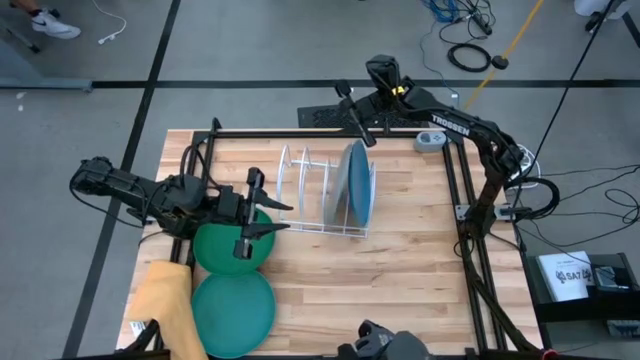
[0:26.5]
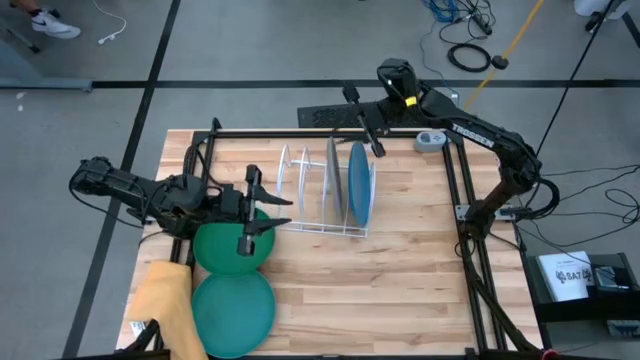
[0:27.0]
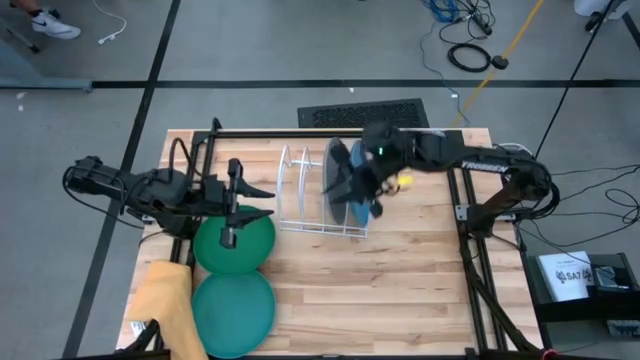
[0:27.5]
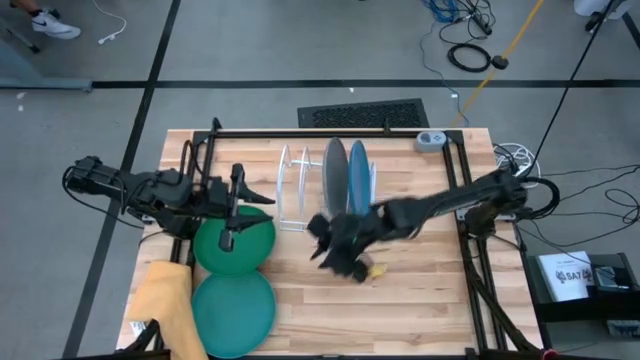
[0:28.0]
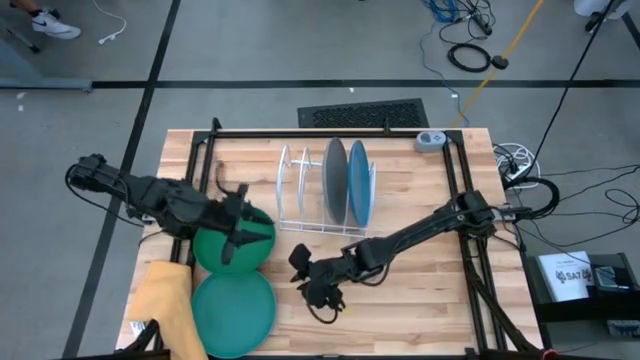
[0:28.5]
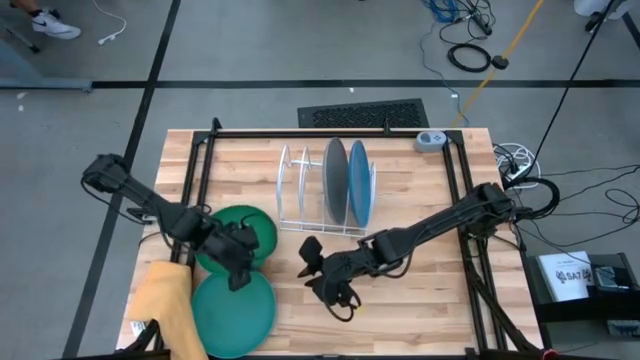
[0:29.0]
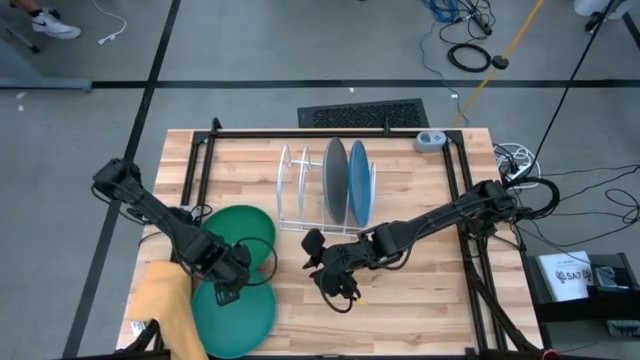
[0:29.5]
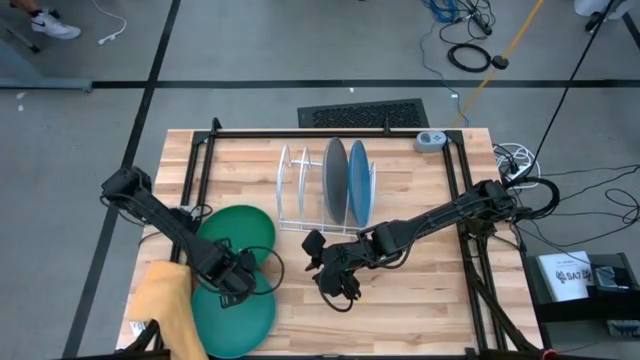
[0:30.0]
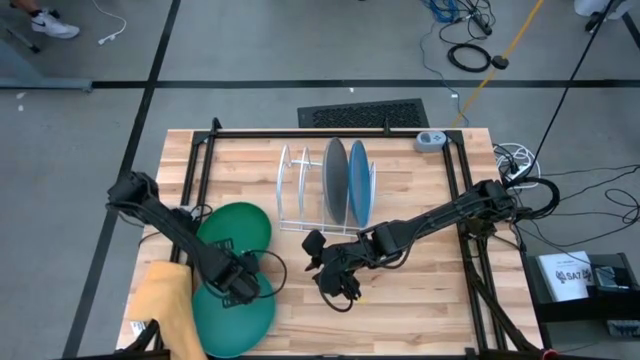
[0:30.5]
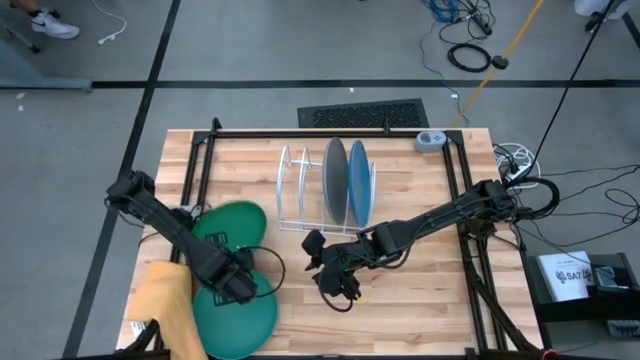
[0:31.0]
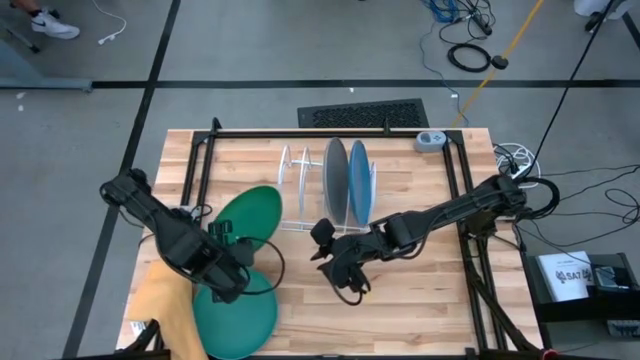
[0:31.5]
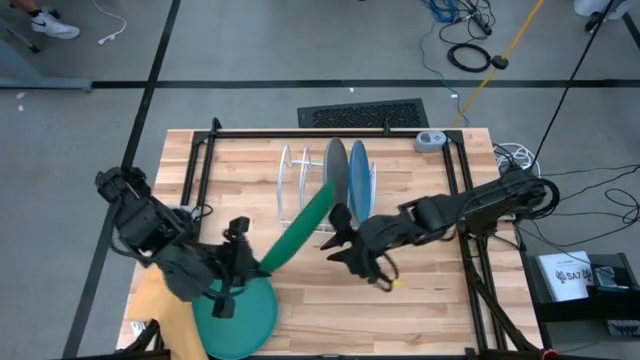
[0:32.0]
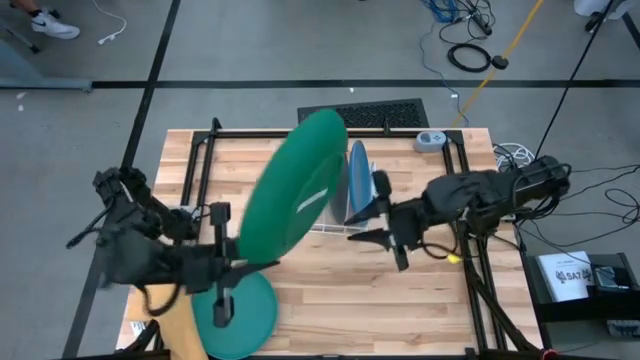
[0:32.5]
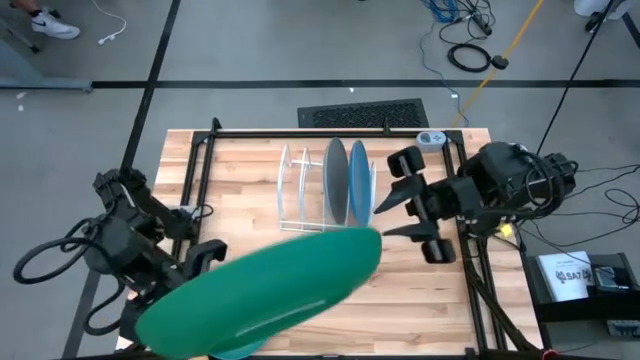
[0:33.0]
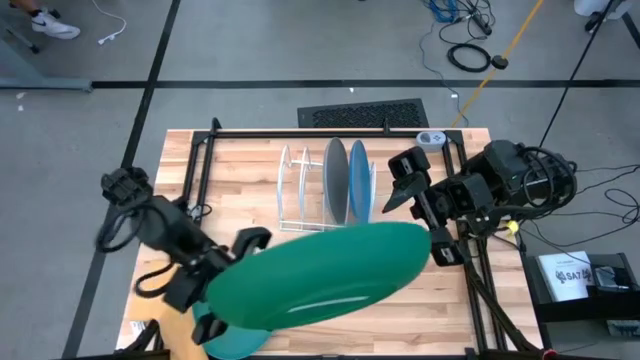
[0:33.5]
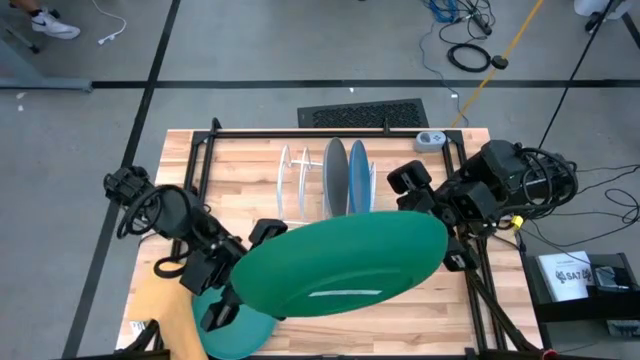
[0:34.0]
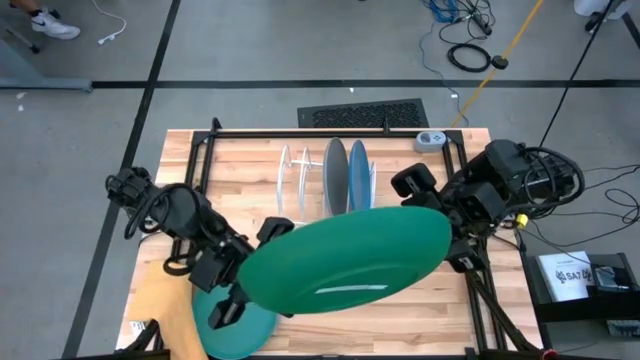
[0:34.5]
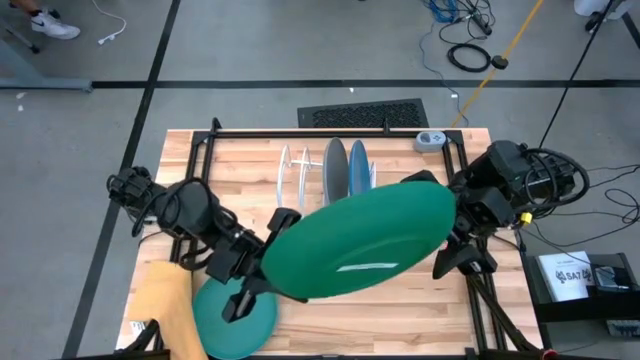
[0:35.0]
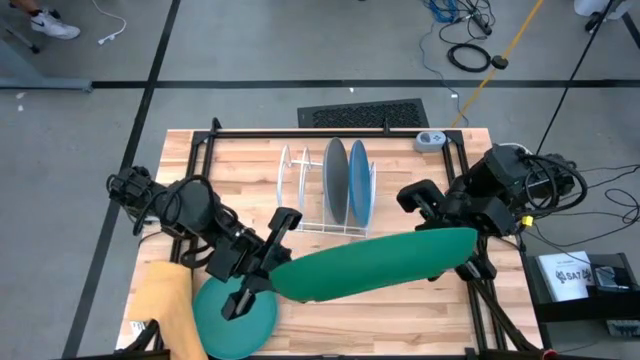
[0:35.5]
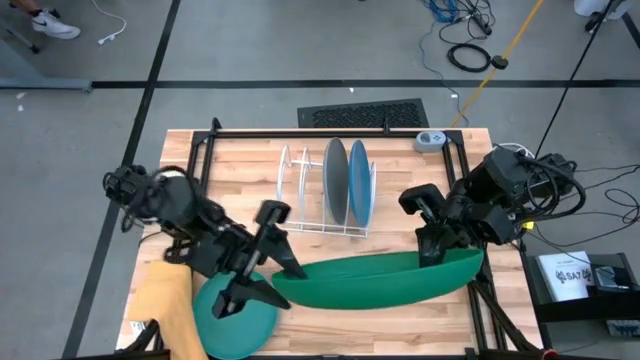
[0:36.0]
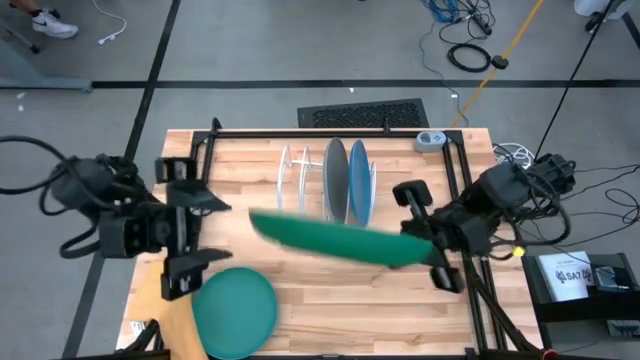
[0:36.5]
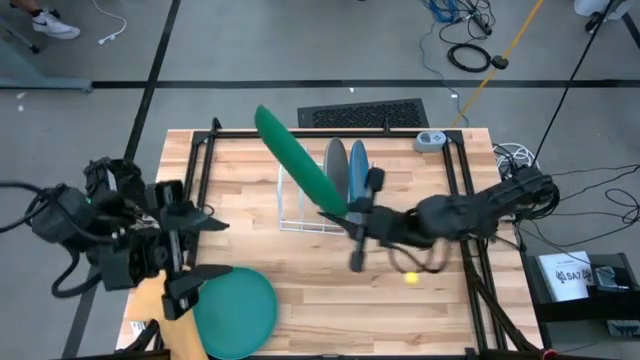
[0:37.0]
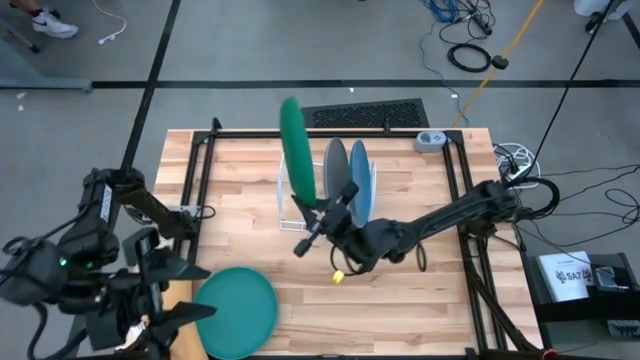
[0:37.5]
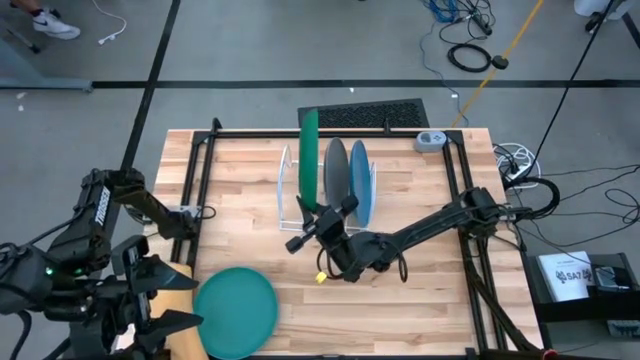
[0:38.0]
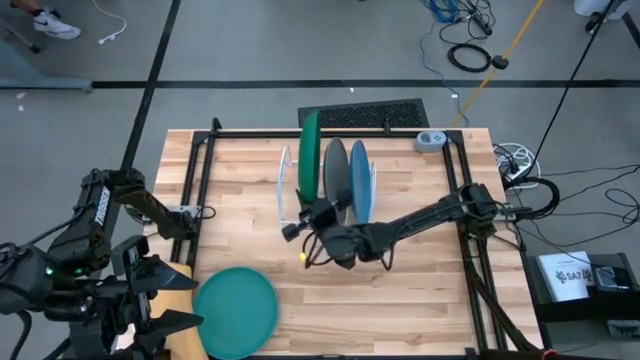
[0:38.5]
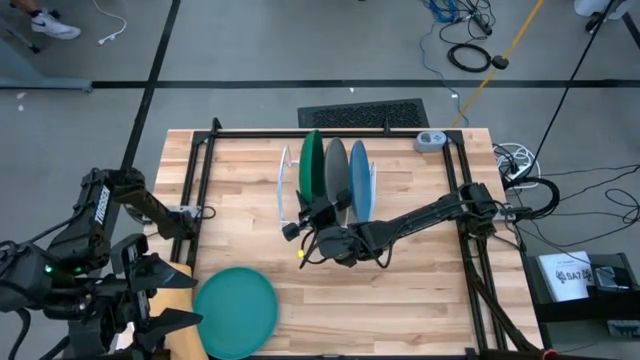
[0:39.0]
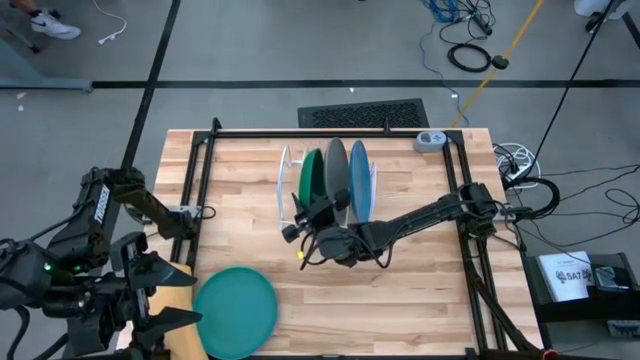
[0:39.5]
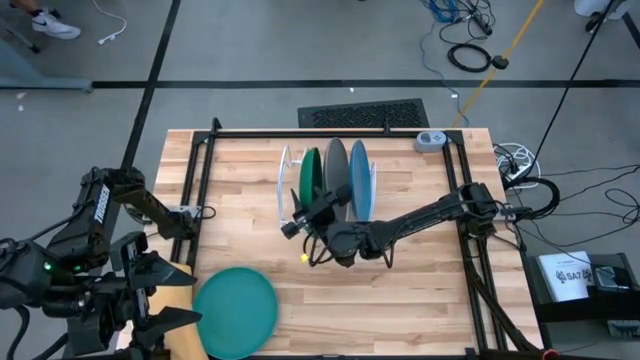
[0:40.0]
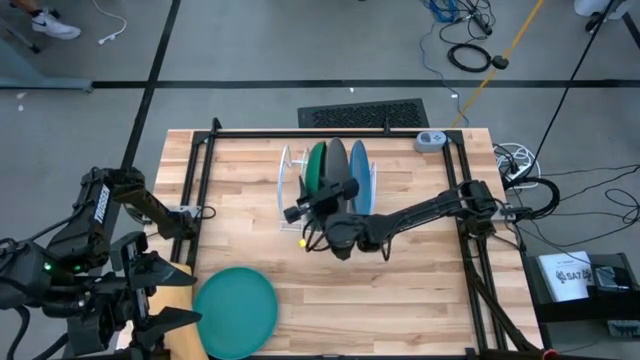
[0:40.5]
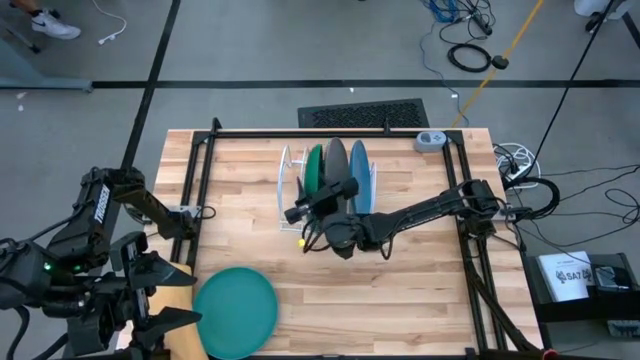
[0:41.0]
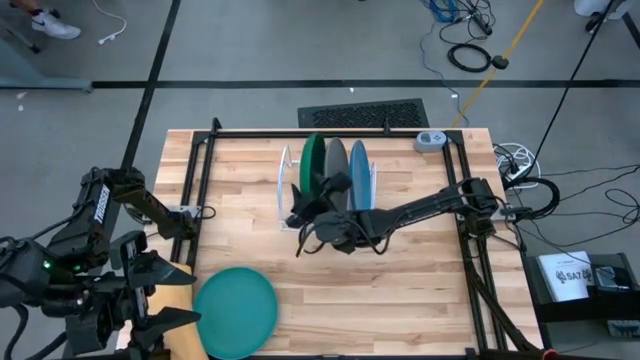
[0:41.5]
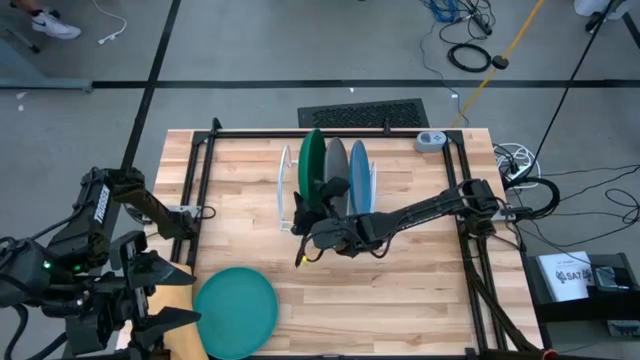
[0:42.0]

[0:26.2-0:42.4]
Task: Sort dishes
Put the dark green plate in the dish rack

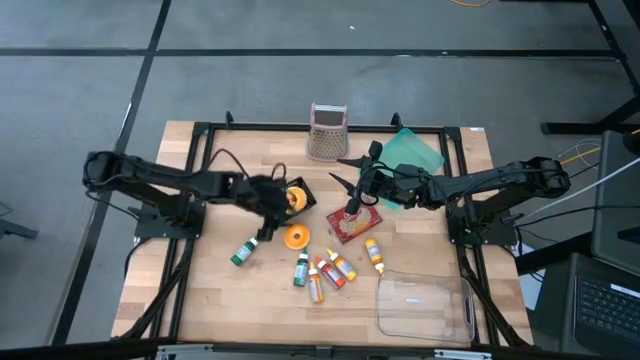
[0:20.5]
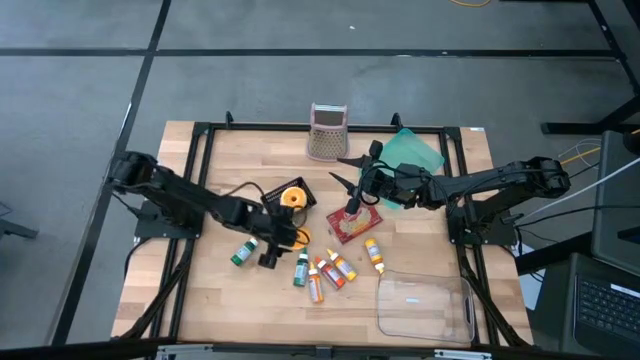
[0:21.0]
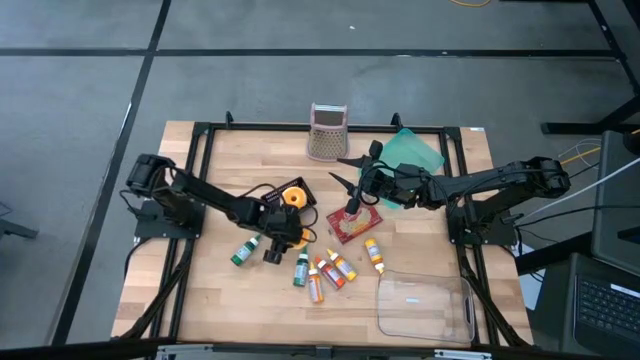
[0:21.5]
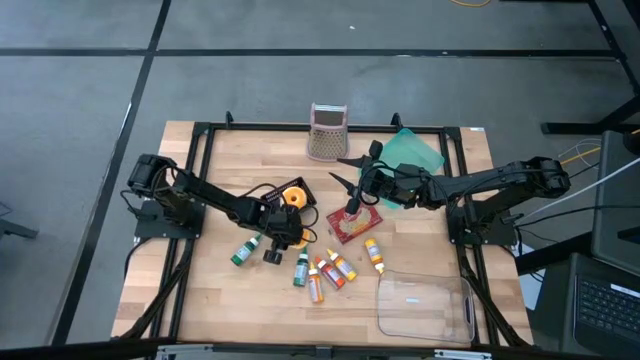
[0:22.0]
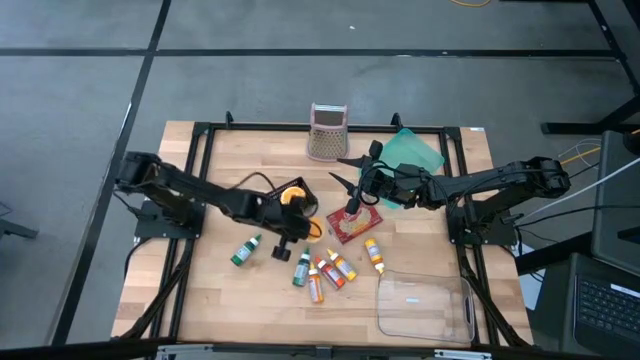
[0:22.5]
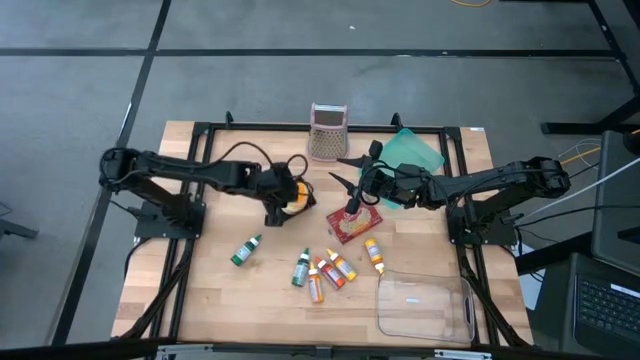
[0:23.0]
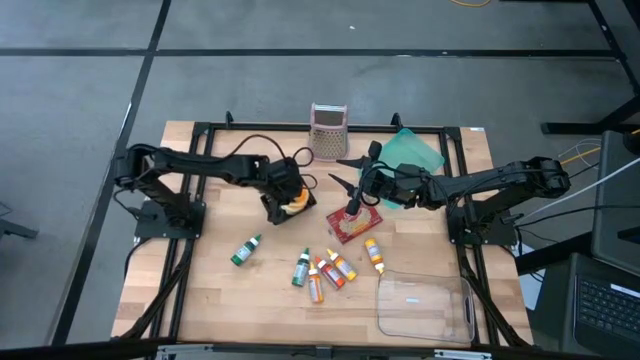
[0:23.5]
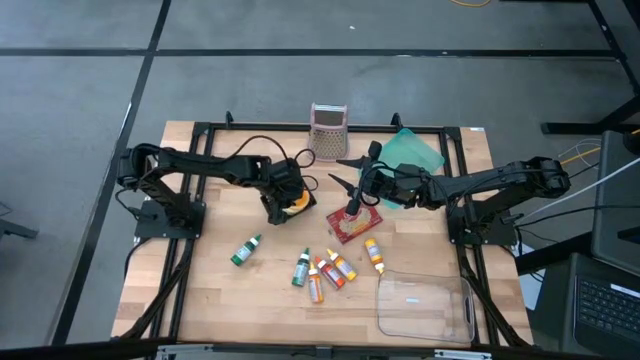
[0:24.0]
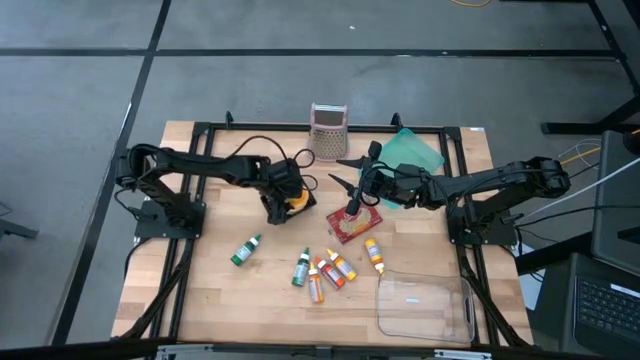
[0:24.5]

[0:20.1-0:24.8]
Task: Pick & Place Food Item
Put the yellow donut into the black bin
